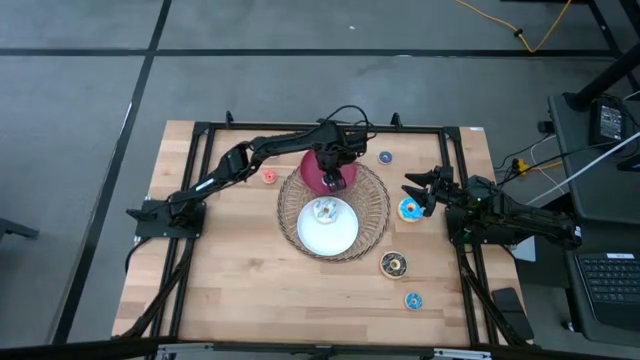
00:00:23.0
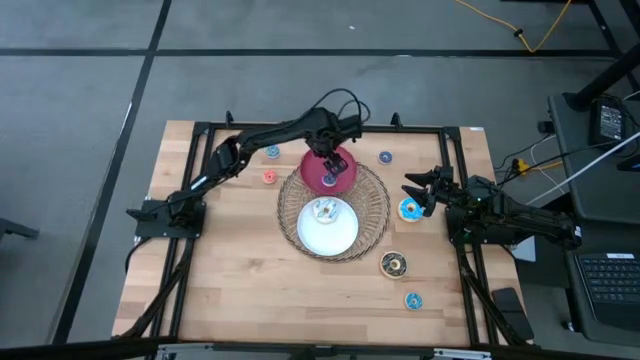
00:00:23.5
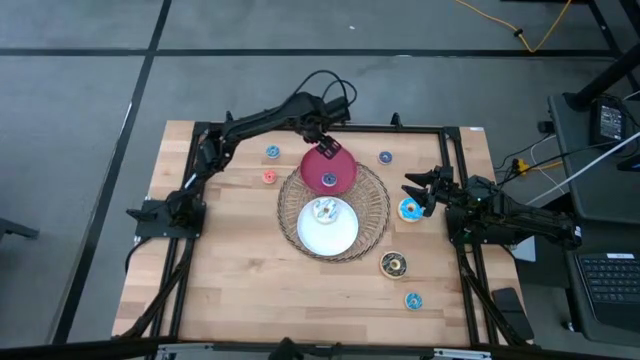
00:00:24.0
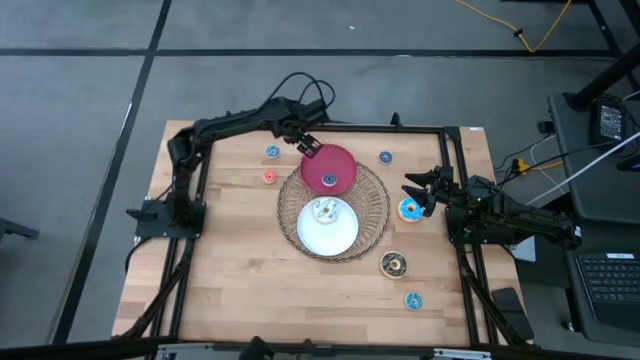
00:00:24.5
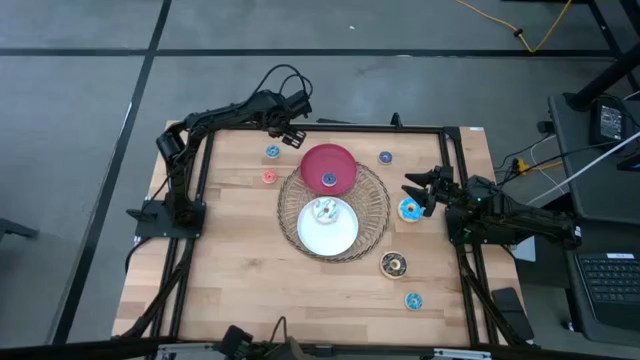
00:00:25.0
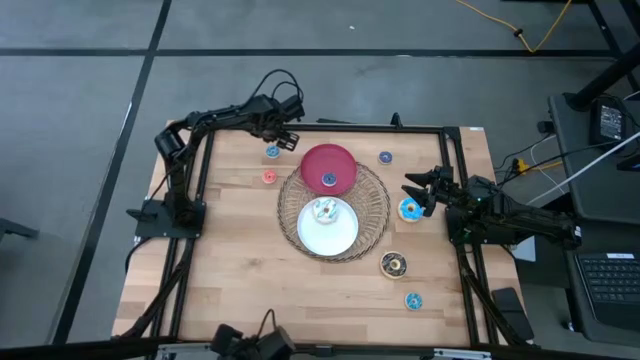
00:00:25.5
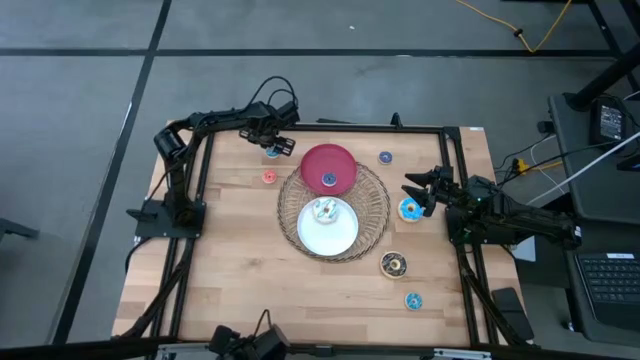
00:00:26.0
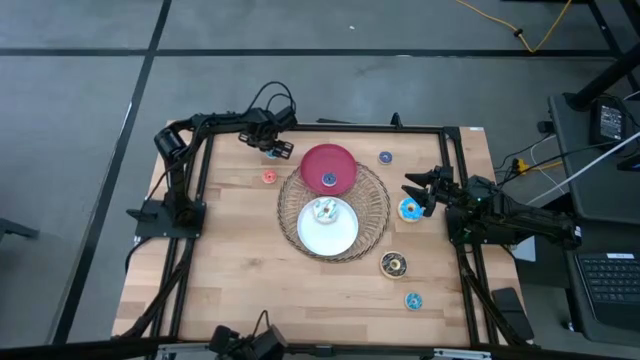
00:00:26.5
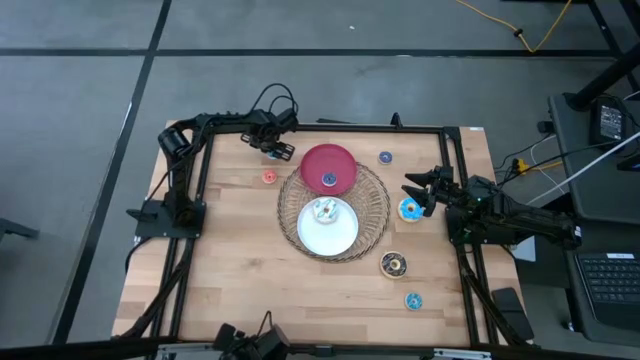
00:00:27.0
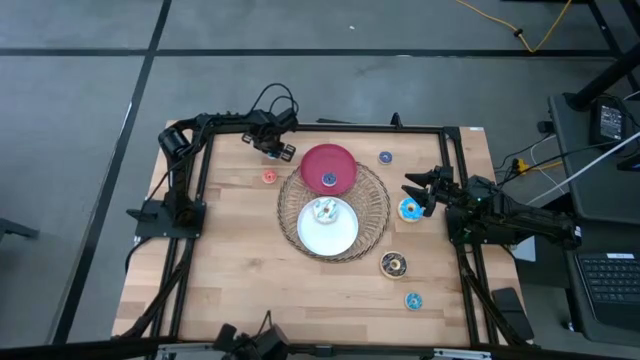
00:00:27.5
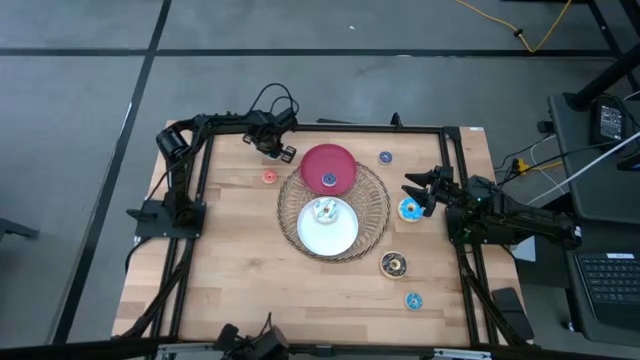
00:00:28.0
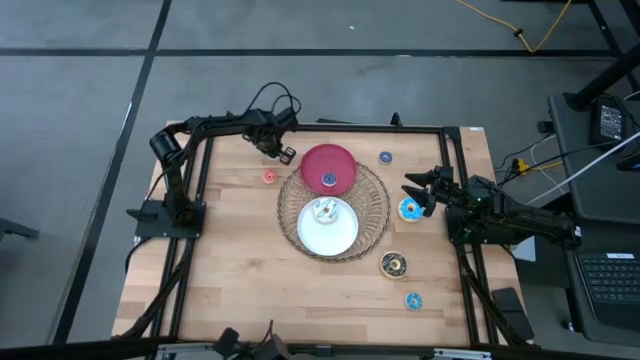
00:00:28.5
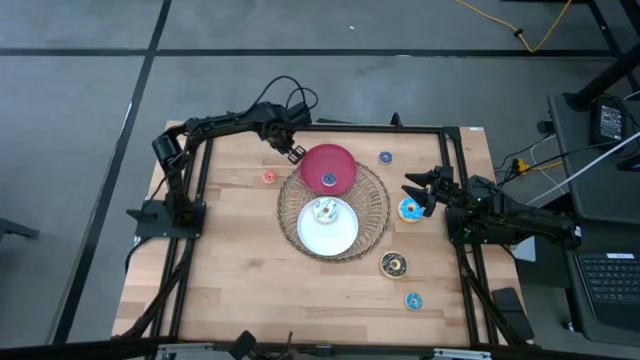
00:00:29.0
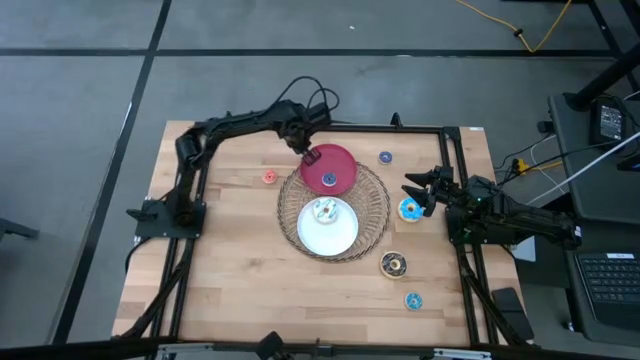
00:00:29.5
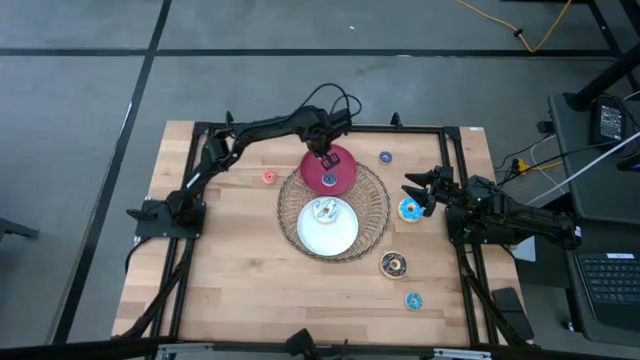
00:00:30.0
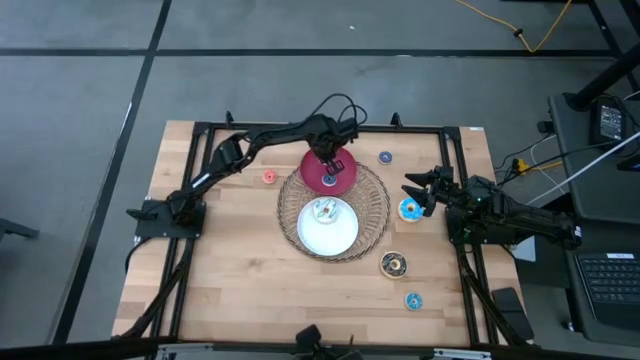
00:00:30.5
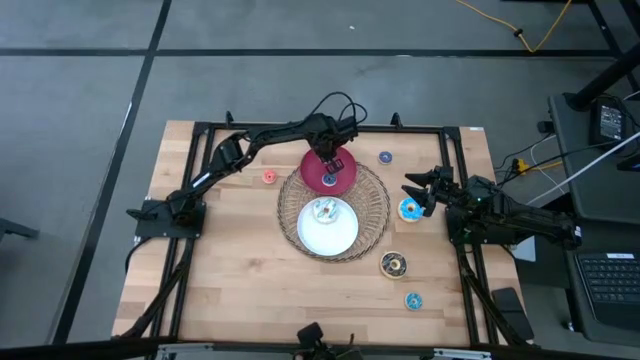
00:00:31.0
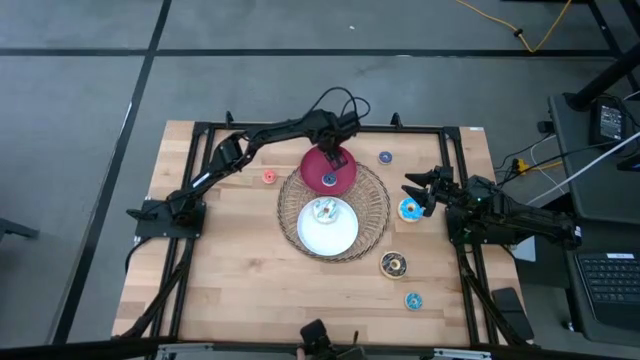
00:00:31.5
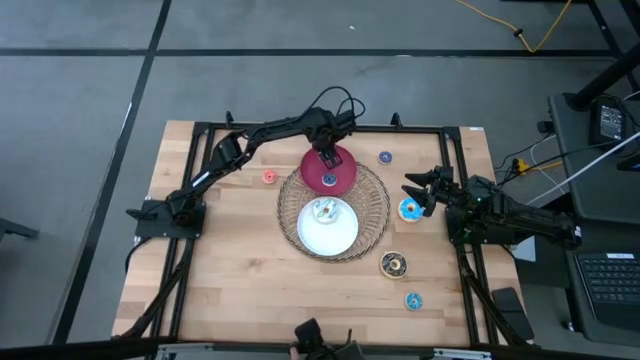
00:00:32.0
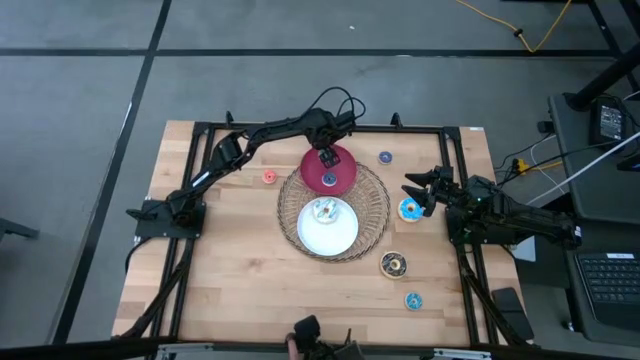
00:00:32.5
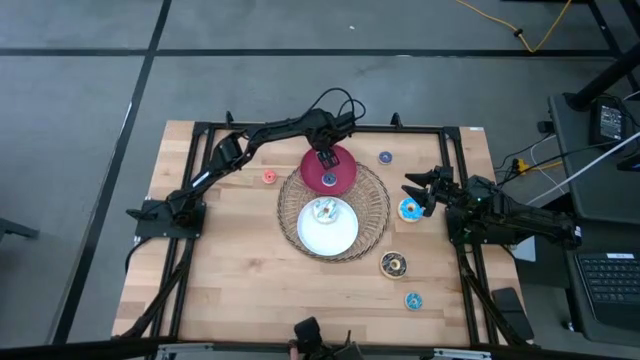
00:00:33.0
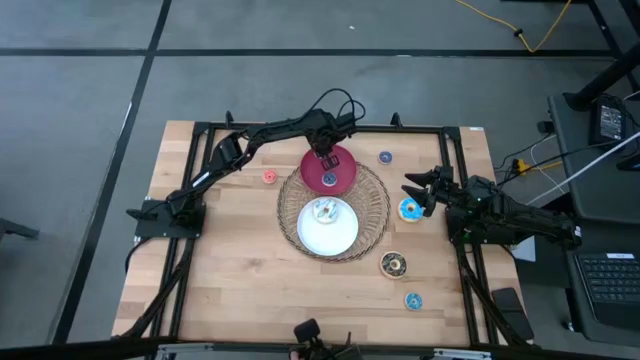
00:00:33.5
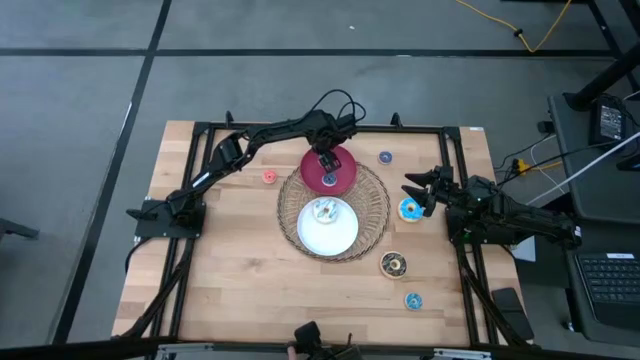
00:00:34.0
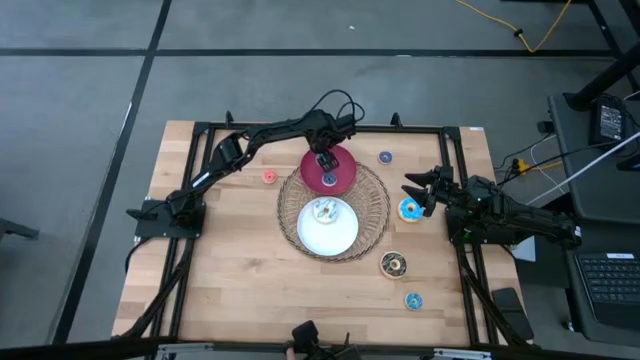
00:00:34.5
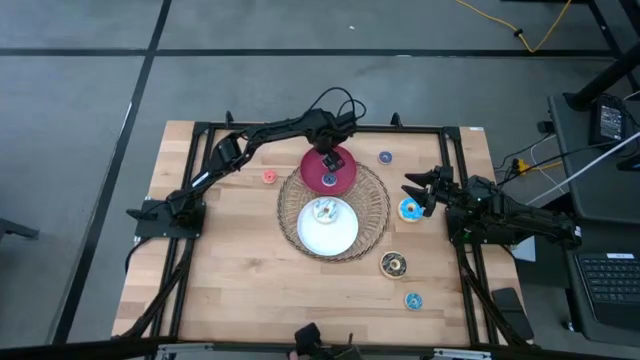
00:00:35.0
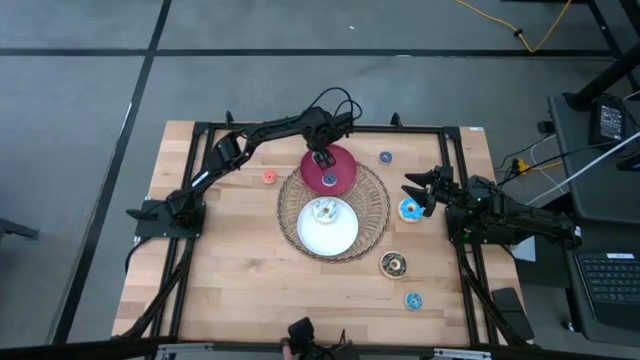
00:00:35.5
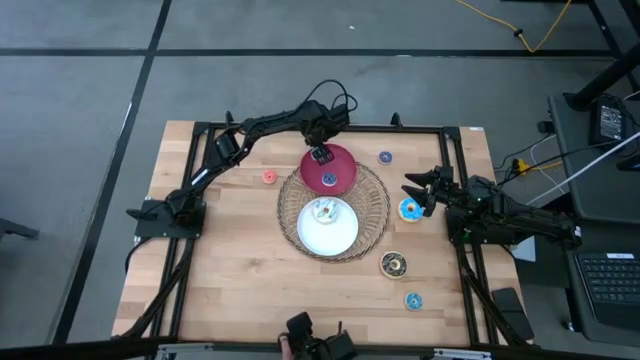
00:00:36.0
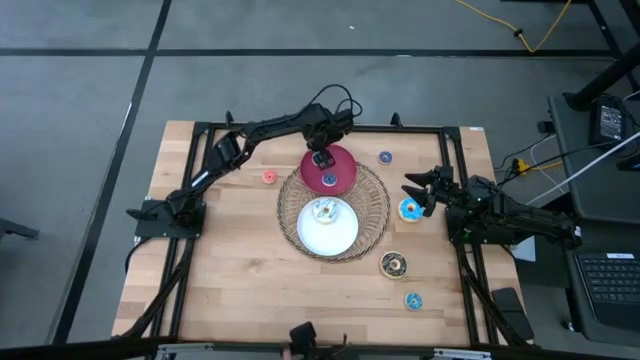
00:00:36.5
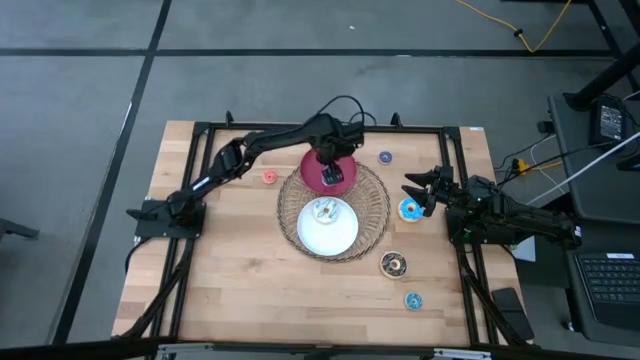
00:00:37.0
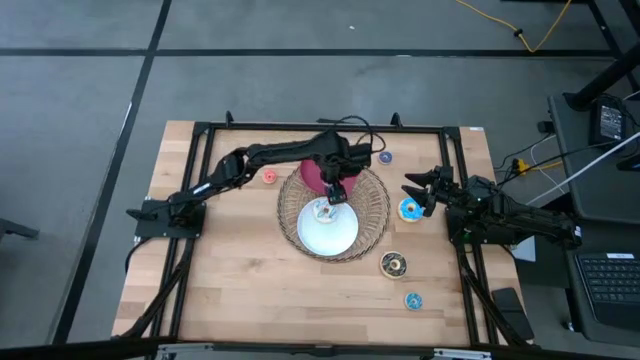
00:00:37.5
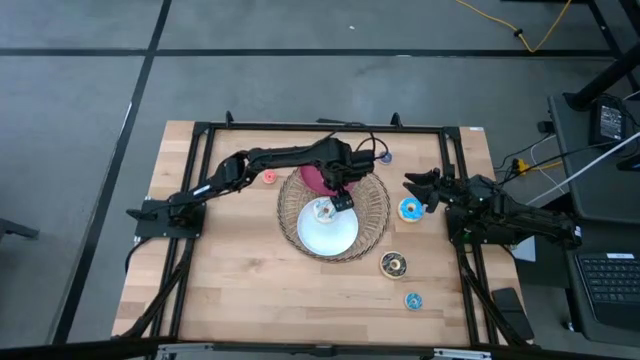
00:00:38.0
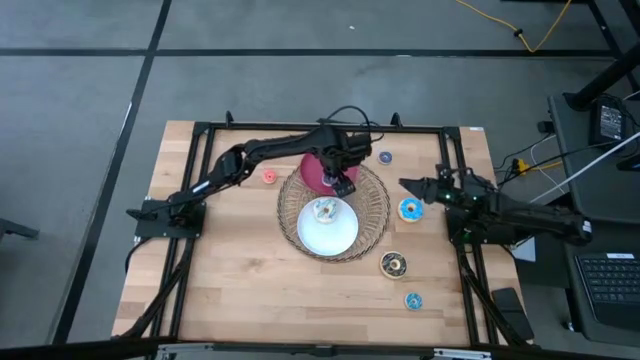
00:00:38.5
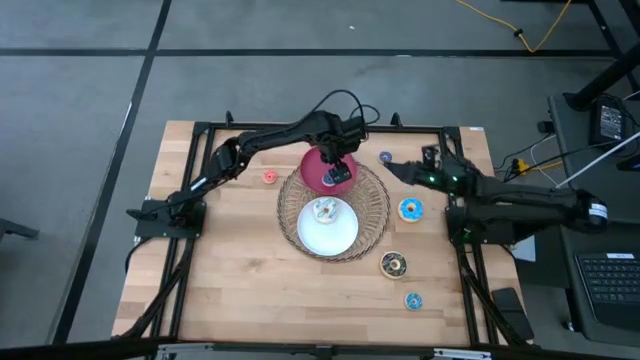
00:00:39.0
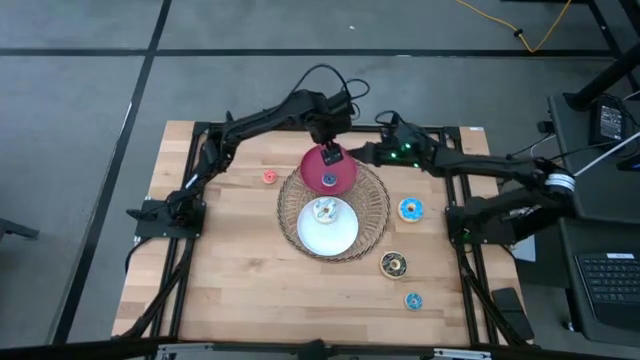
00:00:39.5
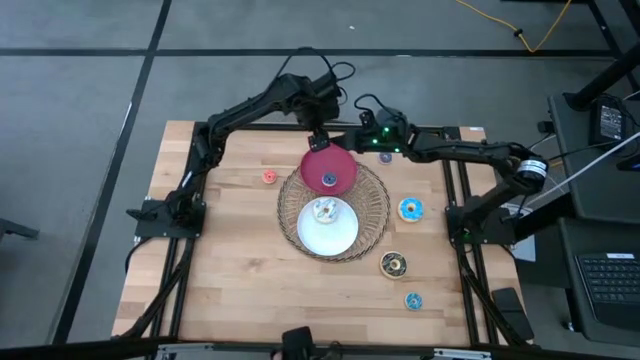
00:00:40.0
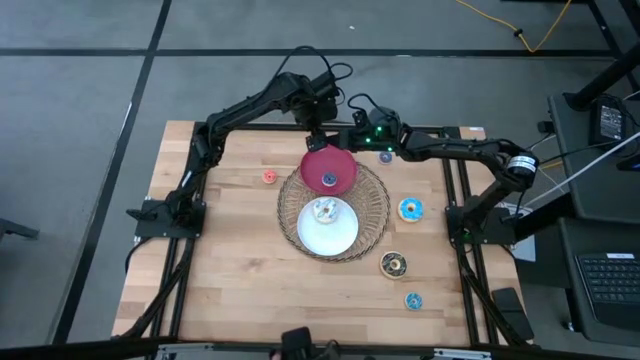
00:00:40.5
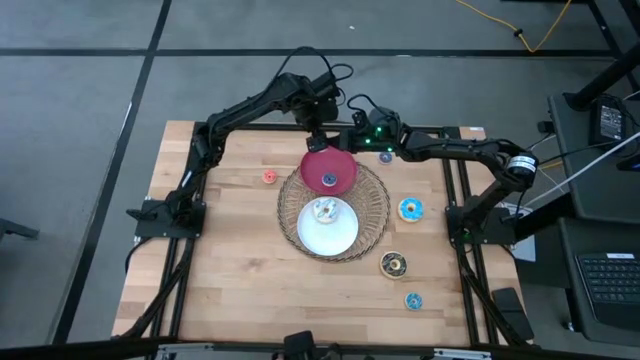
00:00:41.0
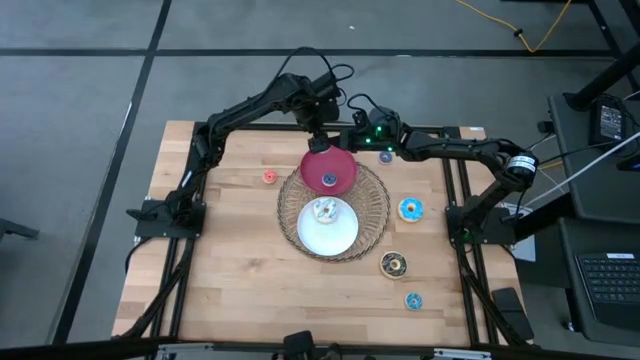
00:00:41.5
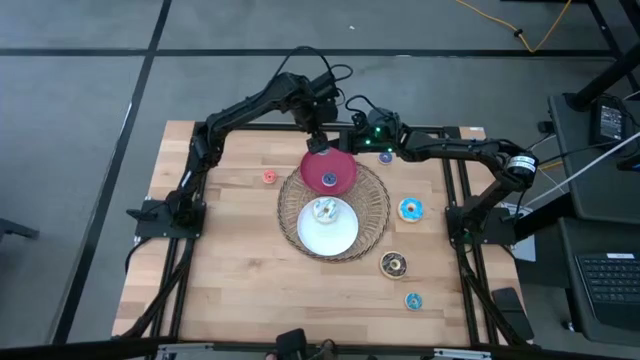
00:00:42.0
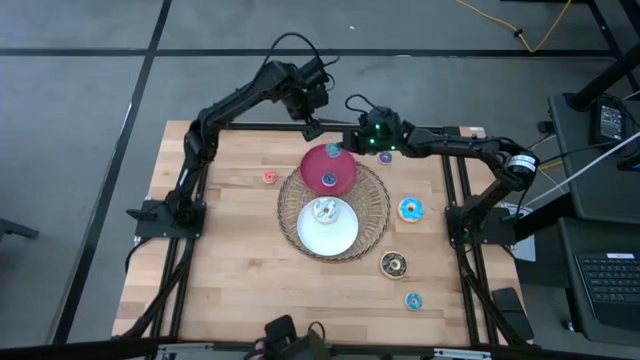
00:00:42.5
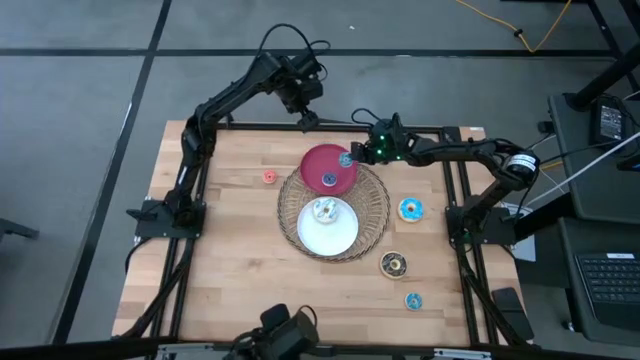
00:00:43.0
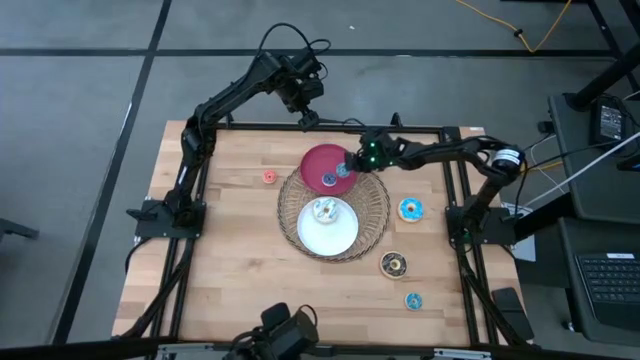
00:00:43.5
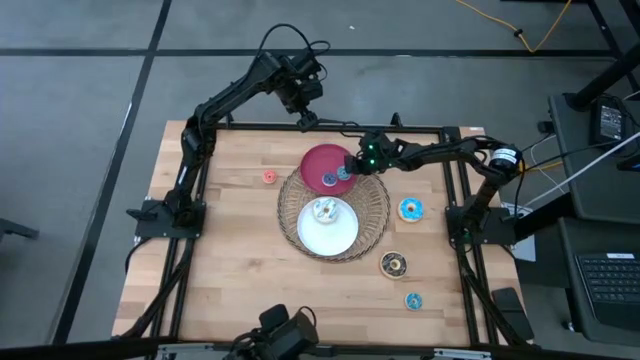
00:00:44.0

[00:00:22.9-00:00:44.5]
Task: Pick & Place donuts
Put the small light blue donut on the red plate
